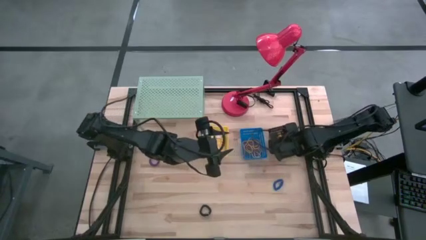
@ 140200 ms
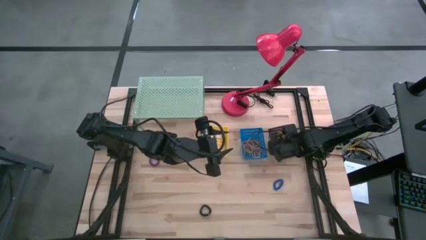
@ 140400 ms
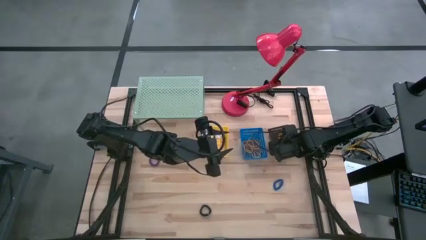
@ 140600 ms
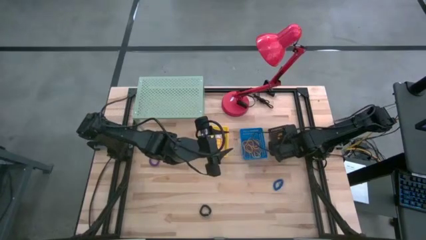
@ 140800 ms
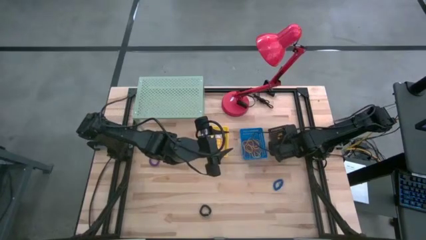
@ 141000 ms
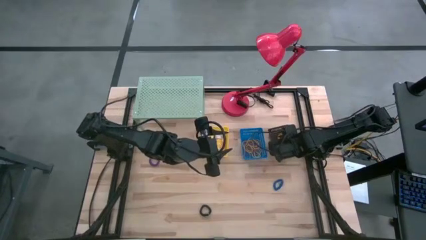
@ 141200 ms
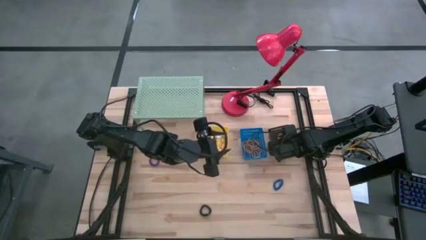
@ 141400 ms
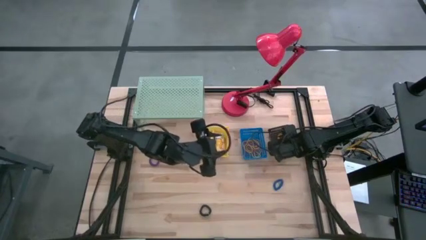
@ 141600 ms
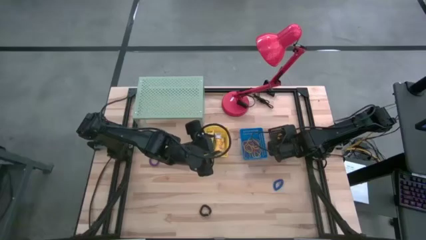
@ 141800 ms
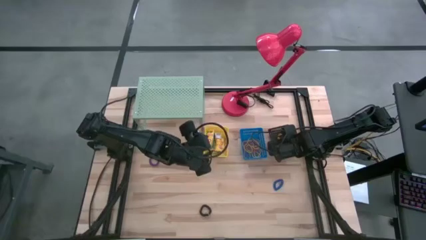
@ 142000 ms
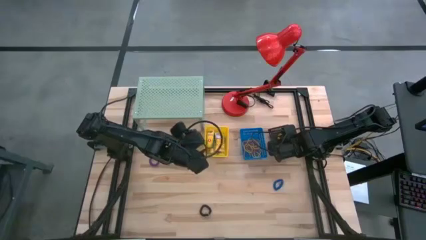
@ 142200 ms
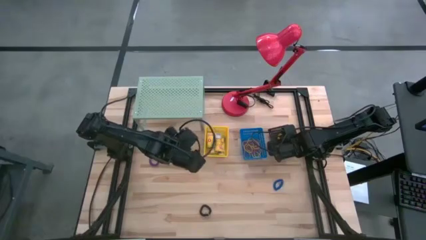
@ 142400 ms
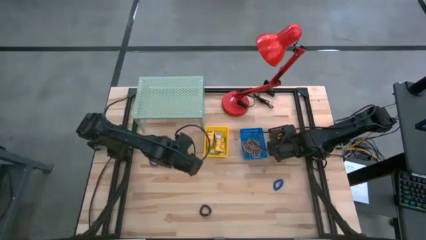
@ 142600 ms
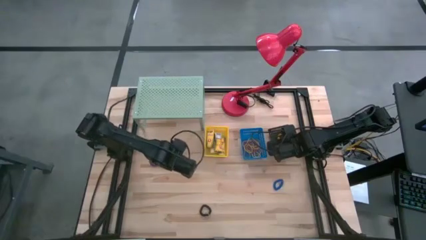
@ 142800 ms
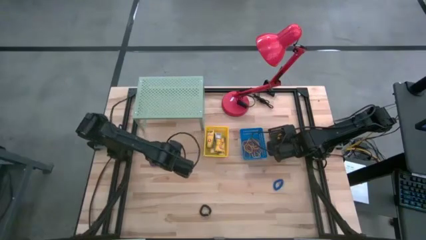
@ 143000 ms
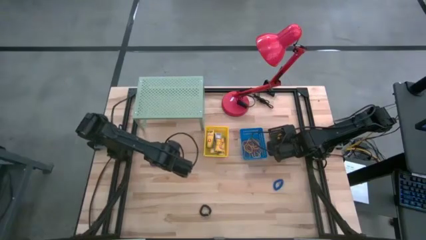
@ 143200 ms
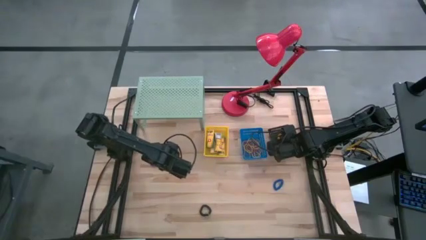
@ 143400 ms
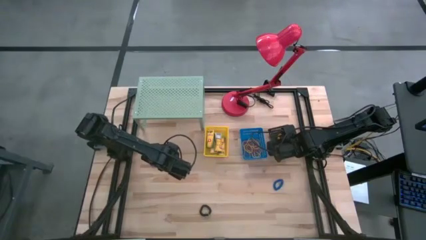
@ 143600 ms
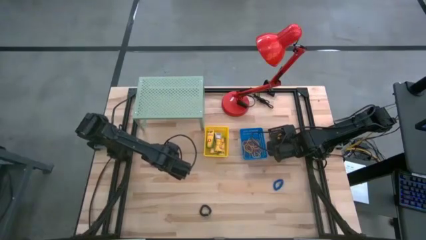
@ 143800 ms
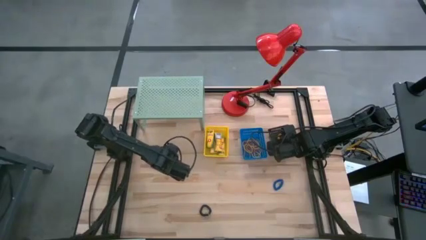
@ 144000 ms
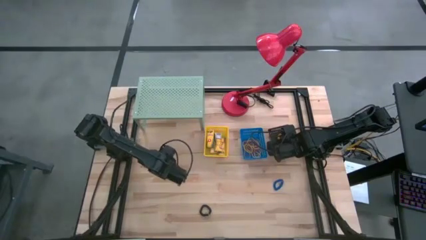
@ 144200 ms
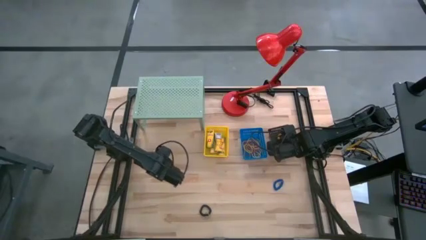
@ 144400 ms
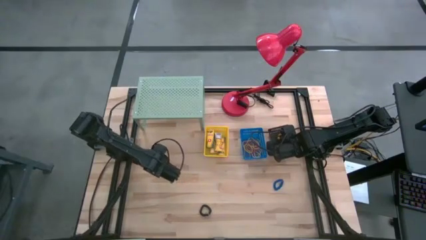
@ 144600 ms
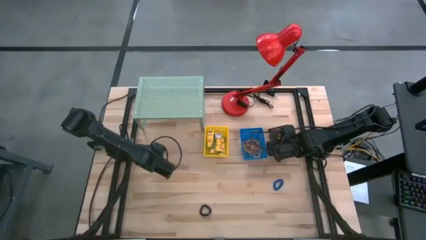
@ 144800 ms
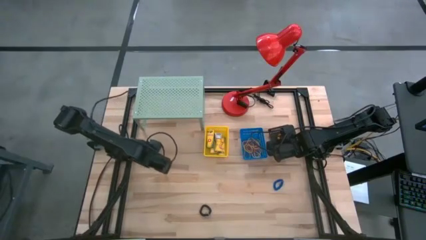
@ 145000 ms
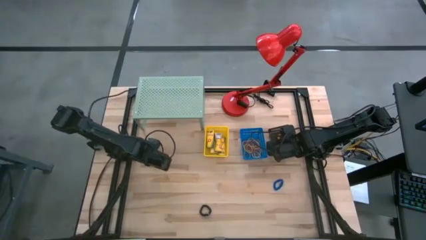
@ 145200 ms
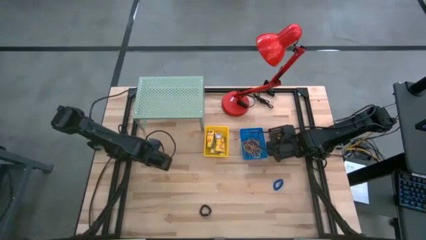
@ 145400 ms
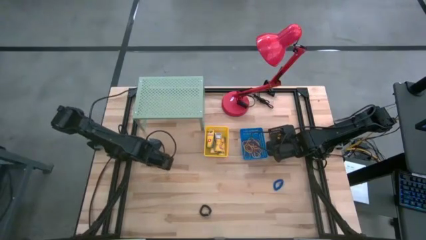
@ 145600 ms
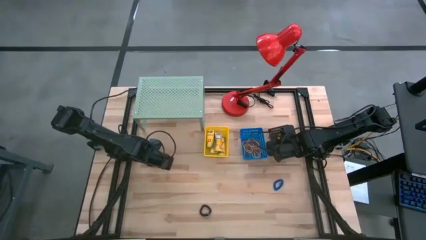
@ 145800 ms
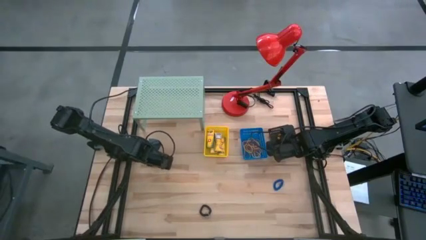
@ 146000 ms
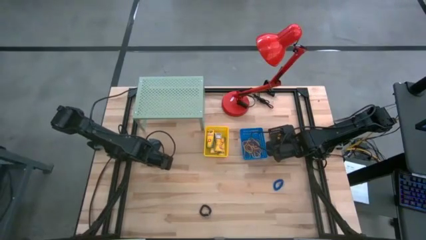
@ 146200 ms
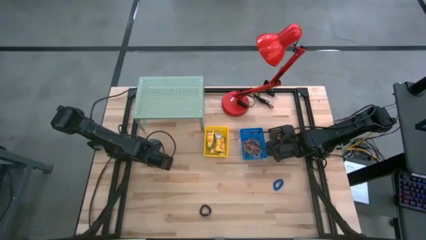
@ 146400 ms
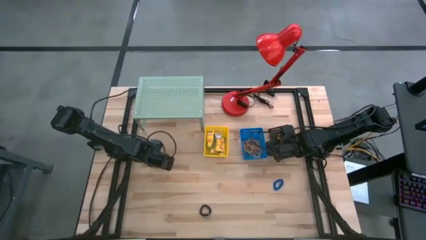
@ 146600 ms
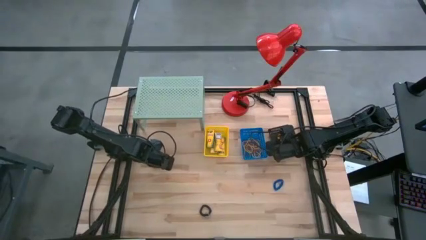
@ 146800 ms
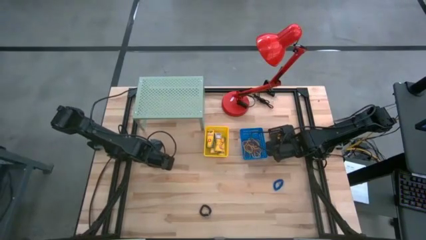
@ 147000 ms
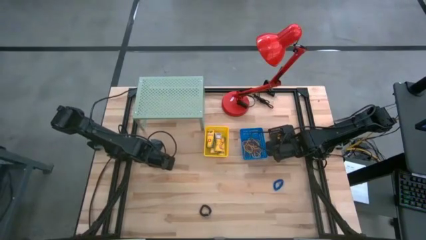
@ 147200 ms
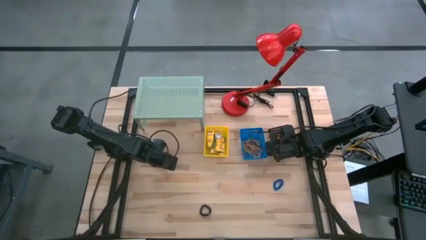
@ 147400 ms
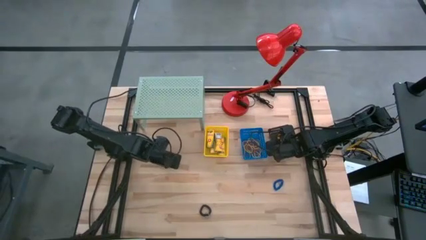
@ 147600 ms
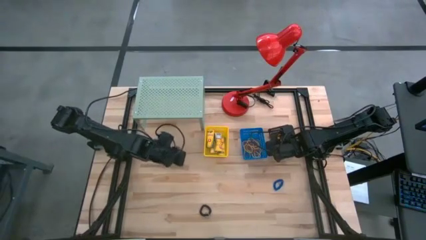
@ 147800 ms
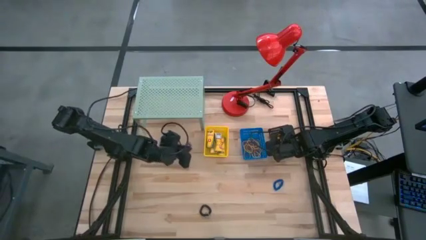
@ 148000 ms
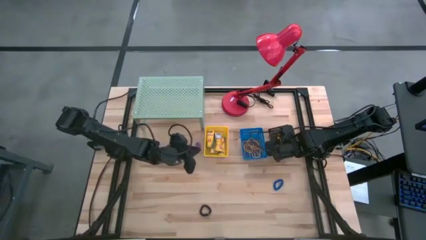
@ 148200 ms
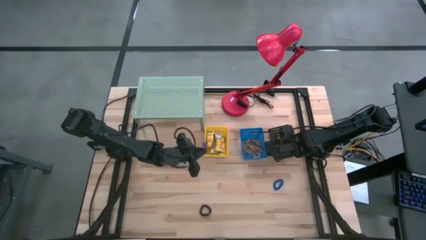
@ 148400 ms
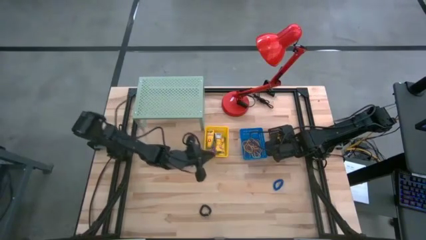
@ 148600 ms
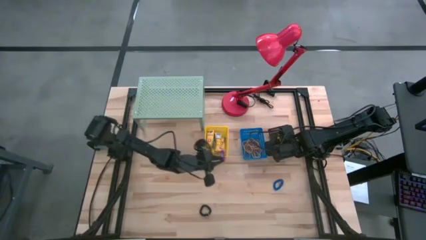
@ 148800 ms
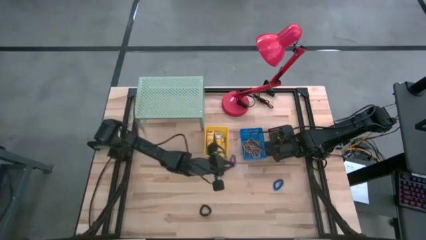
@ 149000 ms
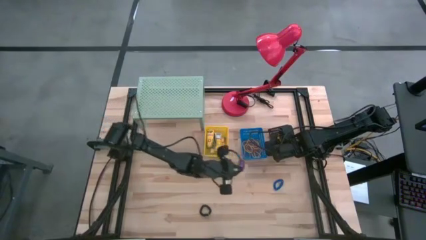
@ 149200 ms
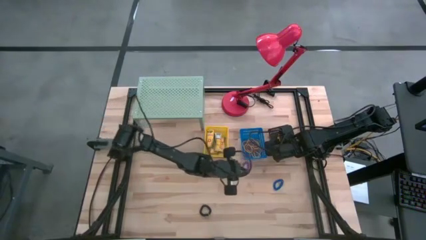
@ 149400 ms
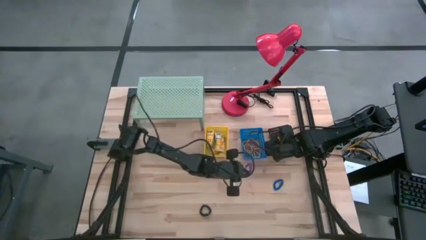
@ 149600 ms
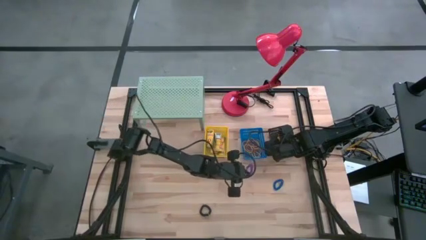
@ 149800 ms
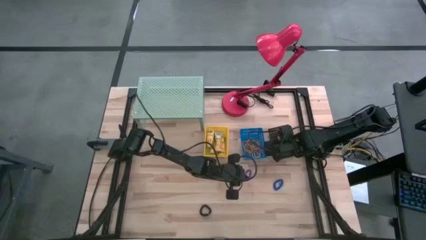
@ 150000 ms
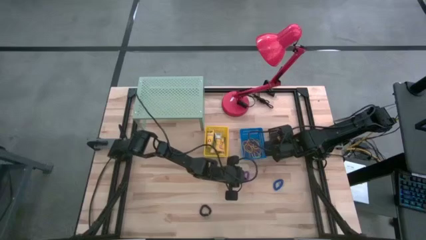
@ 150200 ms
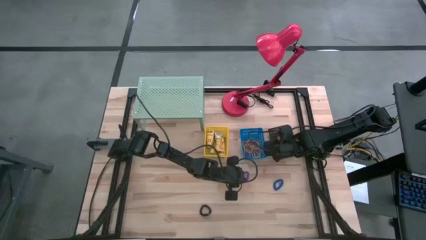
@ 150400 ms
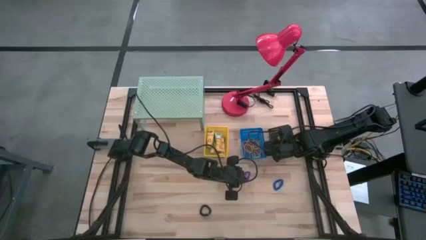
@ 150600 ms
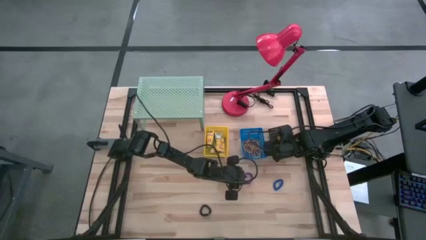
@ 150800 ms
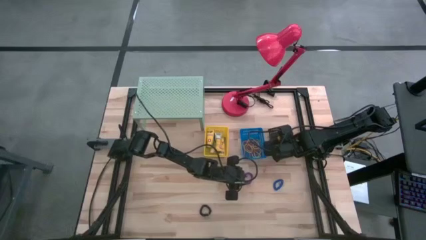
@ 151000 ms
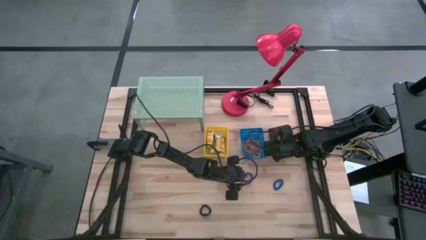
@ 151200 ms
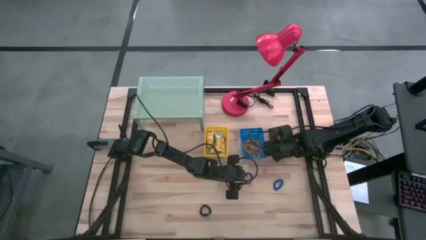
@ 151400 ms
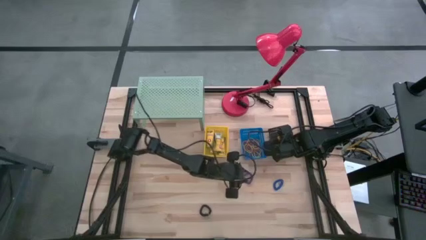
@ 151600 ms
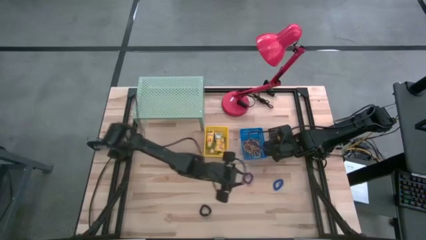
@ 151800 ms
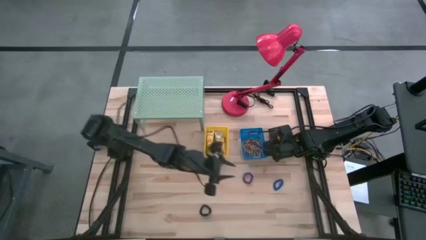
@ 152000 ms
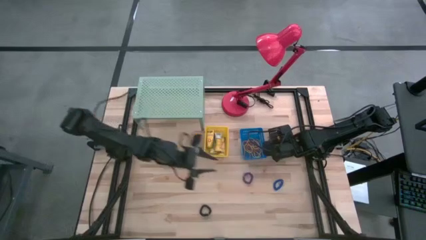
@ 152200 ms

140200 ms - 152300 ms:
Task: Pick & Place Office Desk Supplies
Put the violet spring keychain into the black basket

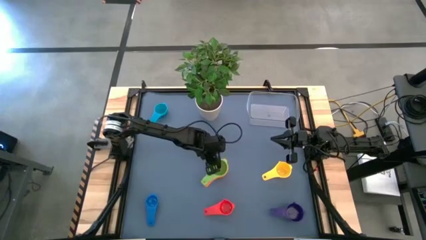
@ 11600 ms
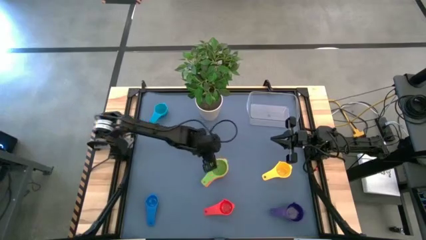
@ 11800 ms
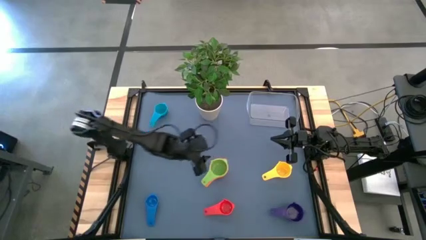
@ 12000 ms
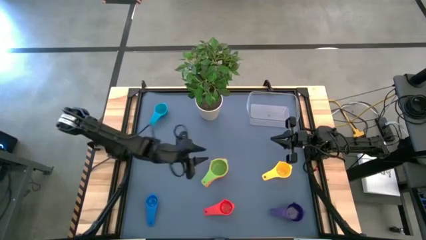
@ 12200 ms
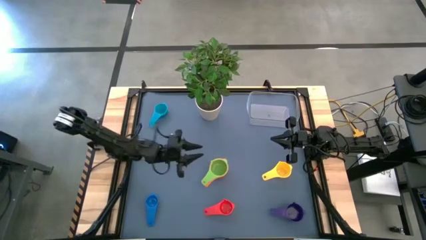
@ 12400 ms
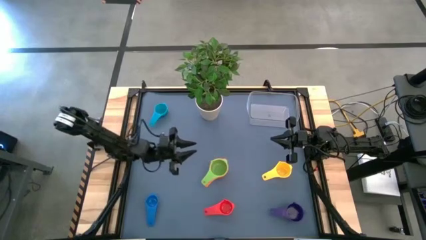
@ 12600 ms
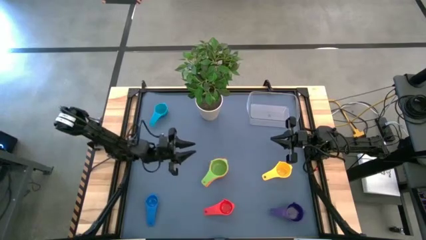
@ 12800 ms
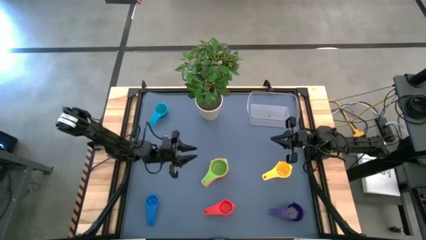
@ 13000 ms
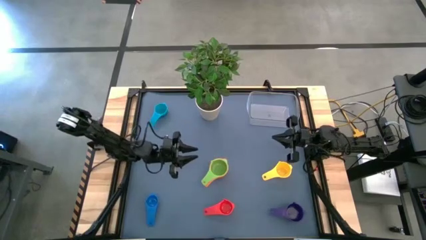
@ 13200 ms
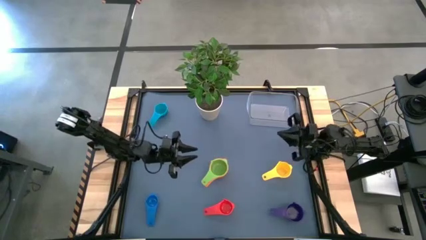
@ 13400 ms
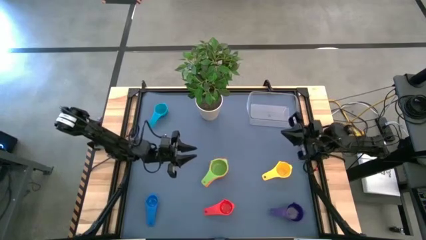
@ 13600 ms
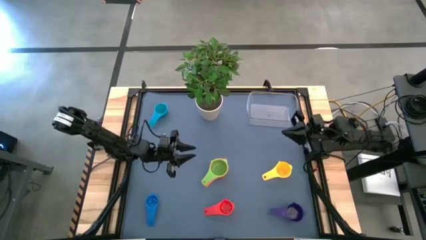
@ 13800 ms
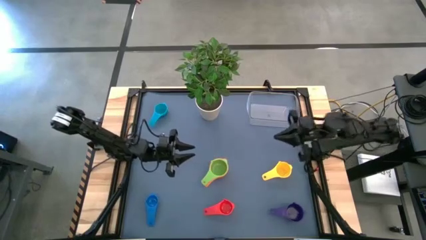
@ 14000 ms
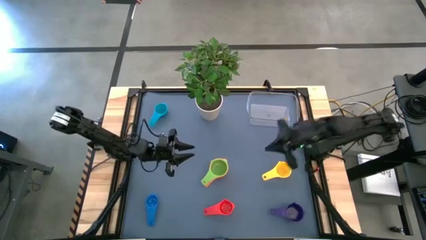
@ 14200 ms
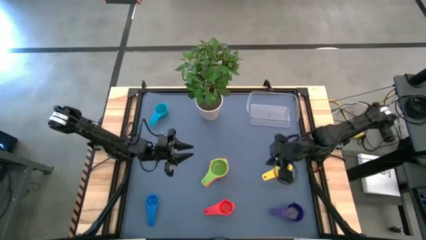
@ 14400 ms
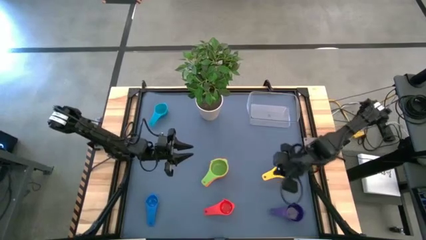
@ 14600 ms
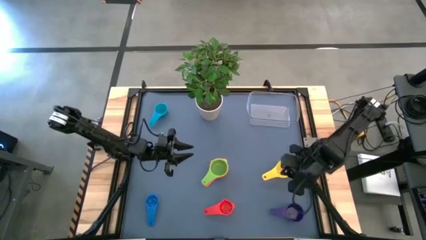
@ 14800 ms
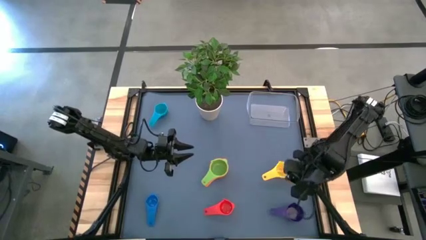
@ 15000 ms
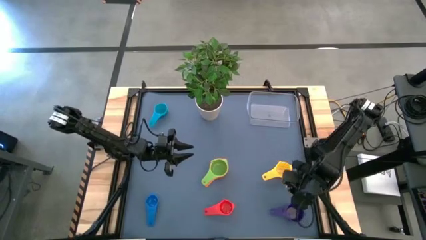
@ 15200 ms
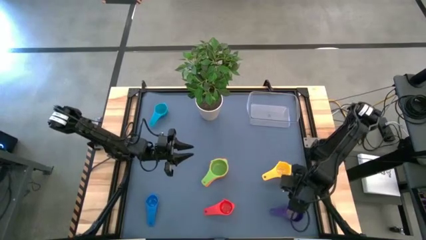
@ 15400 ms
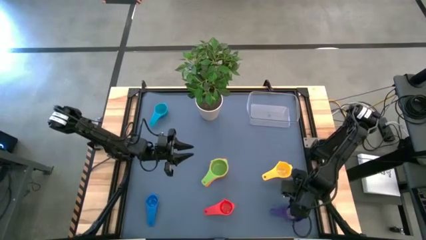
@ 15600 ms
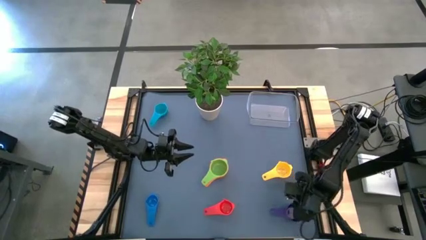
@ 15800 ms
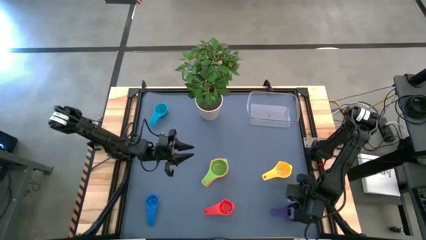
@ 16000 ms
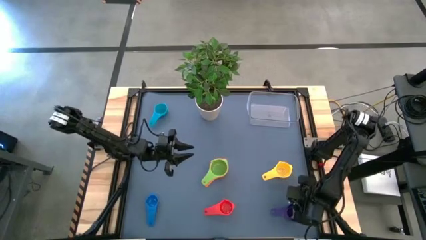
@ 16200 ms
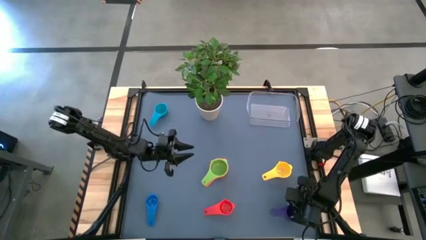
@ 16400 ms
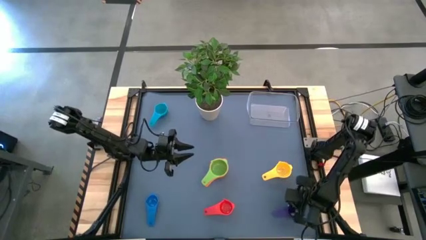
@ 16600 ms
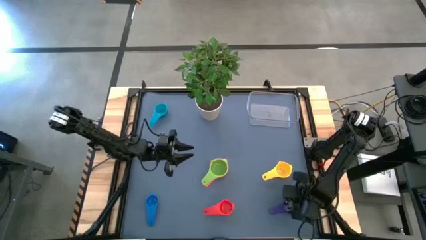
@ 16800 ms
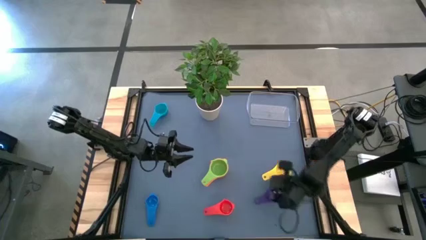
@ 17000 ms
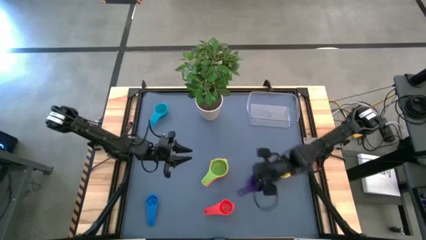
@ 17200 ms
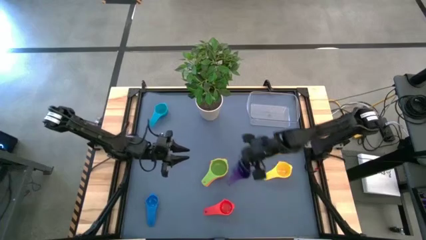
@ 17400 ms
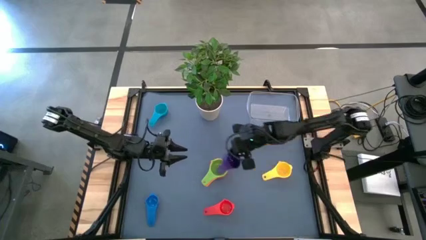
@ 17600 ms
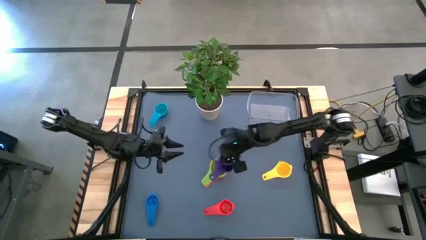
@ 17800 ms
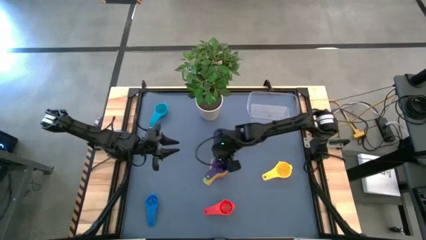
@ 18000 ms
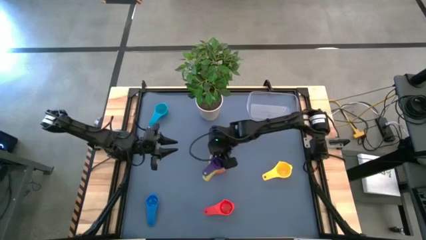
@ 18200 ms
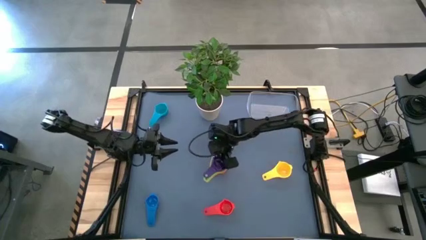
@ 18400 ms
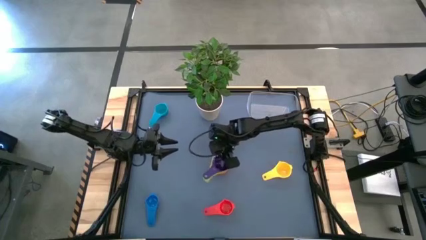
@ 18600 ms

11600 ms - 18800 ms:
Task: Nest measuring cups in basket
Stack the purple measuring cup on top of the green measuring cup
